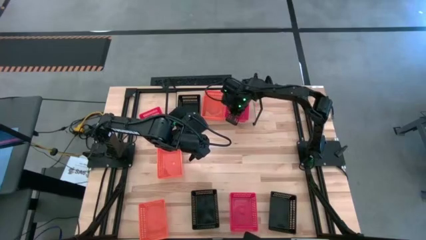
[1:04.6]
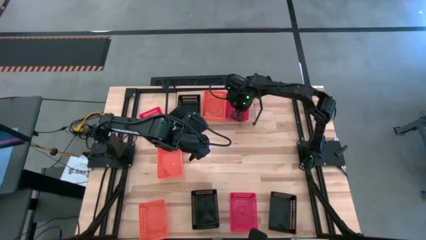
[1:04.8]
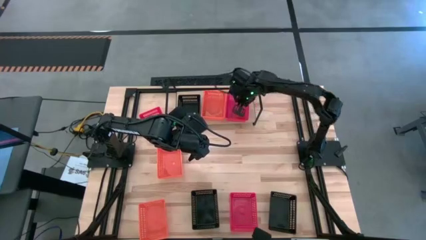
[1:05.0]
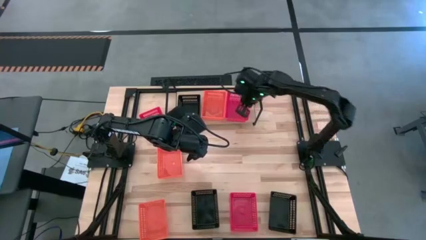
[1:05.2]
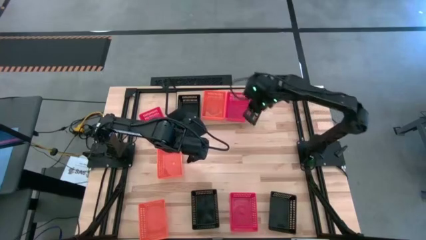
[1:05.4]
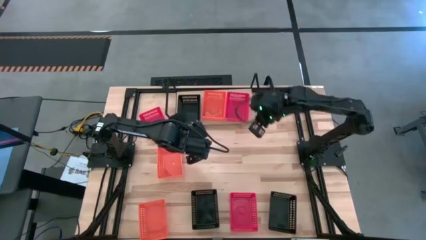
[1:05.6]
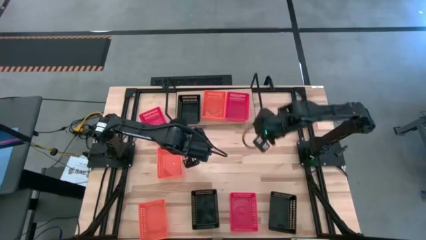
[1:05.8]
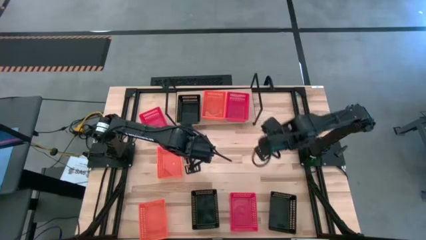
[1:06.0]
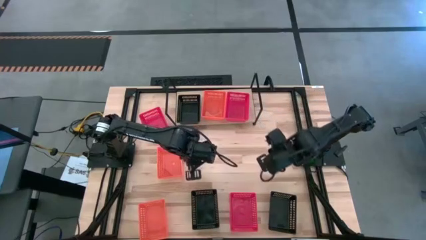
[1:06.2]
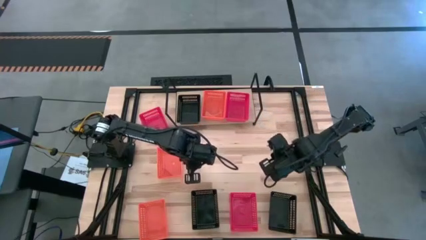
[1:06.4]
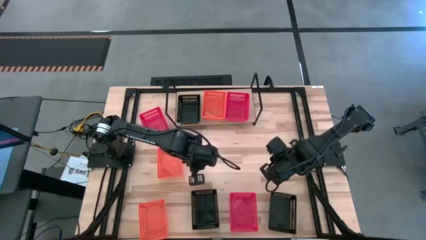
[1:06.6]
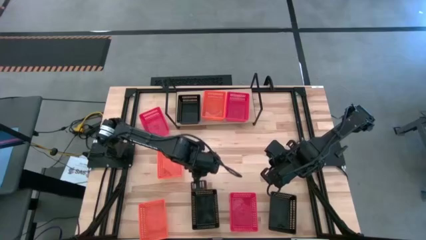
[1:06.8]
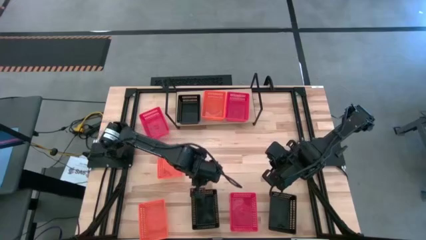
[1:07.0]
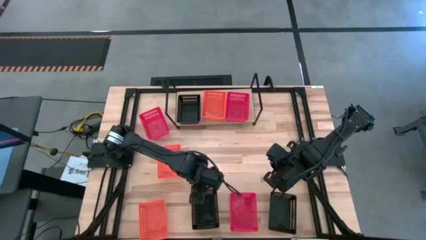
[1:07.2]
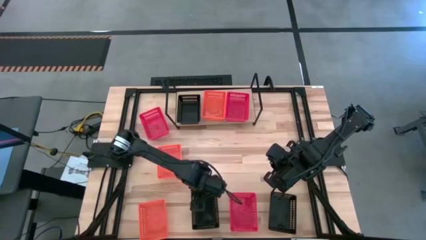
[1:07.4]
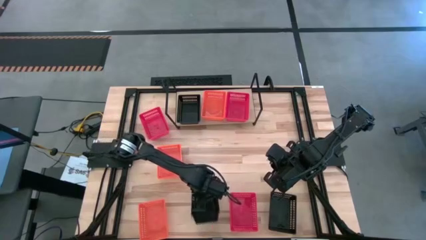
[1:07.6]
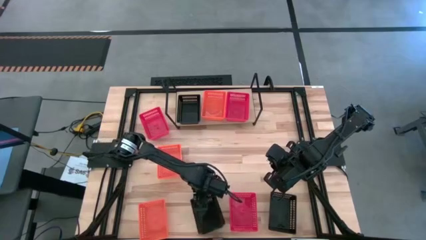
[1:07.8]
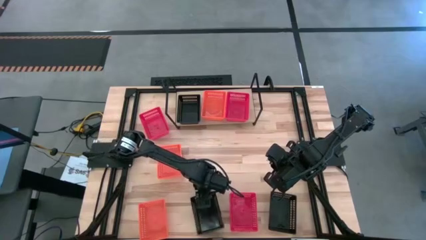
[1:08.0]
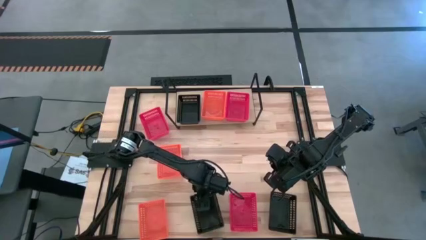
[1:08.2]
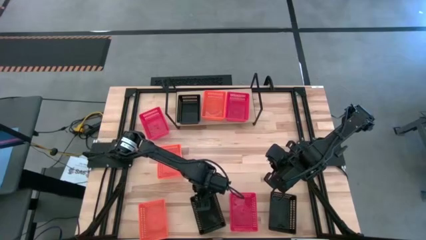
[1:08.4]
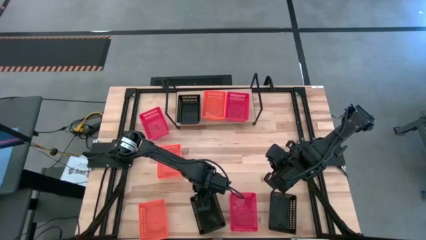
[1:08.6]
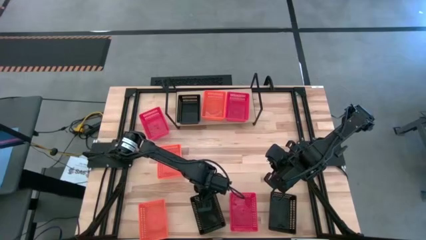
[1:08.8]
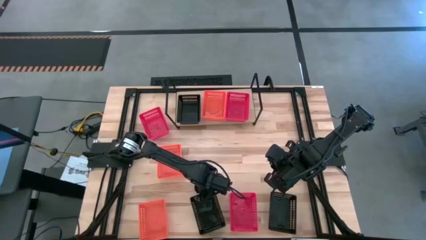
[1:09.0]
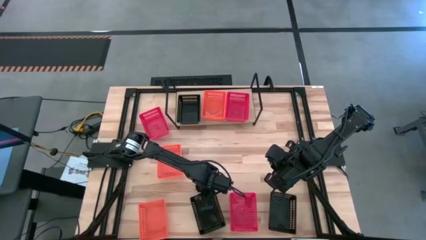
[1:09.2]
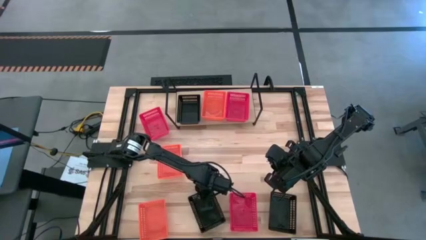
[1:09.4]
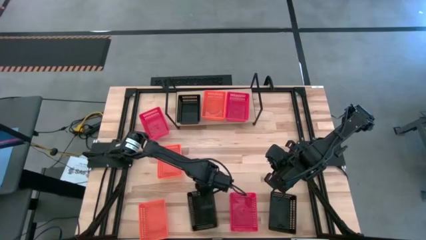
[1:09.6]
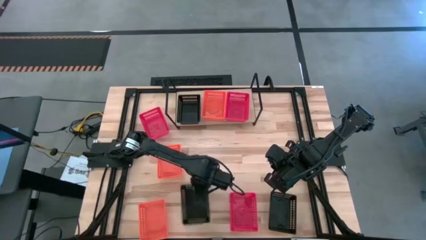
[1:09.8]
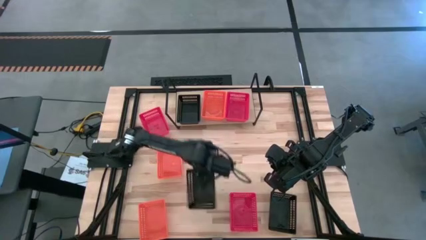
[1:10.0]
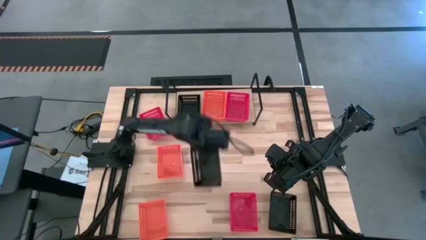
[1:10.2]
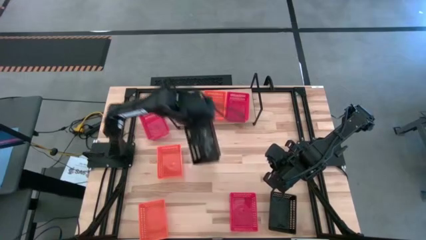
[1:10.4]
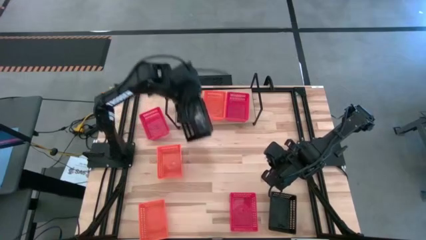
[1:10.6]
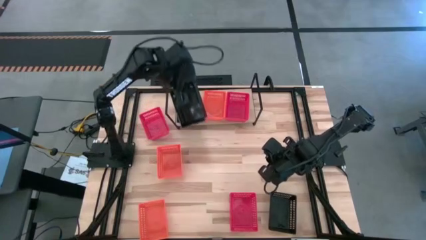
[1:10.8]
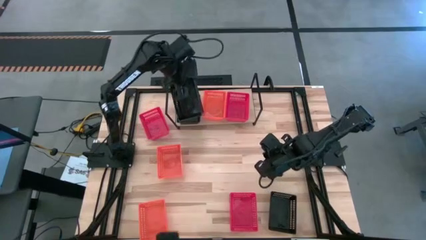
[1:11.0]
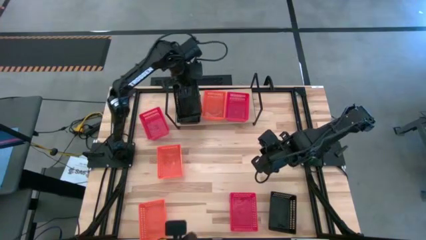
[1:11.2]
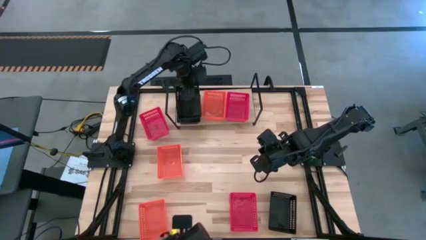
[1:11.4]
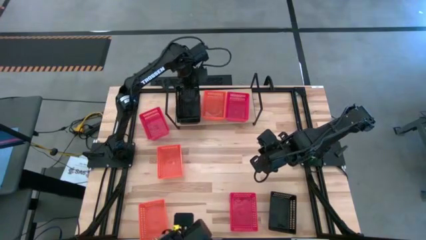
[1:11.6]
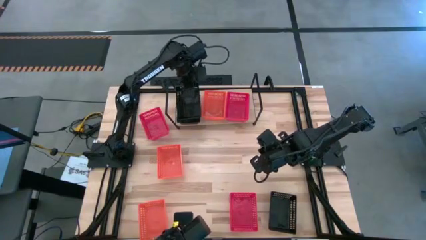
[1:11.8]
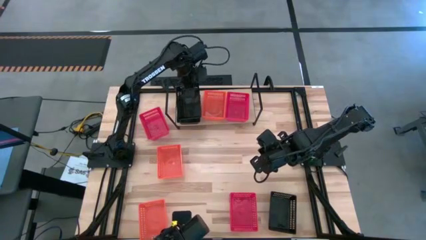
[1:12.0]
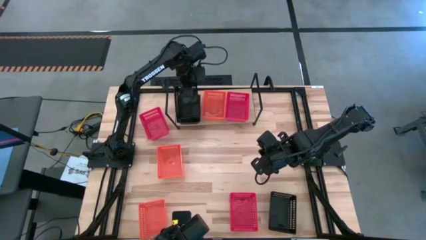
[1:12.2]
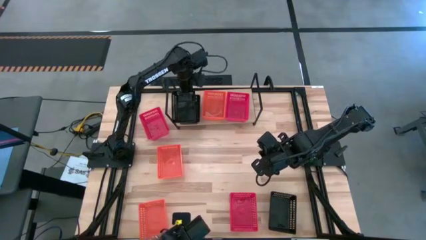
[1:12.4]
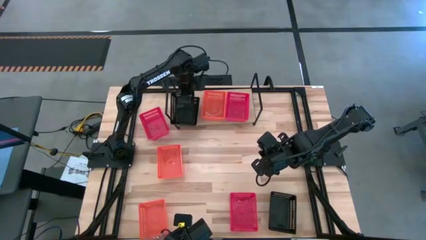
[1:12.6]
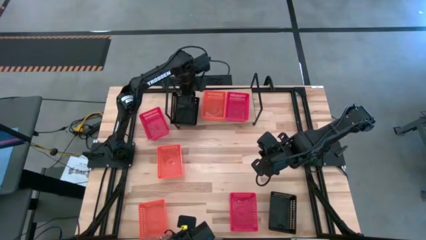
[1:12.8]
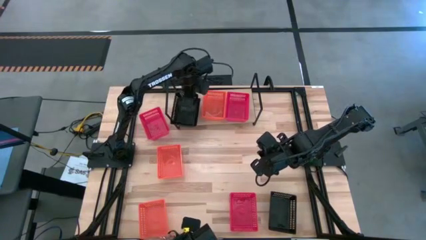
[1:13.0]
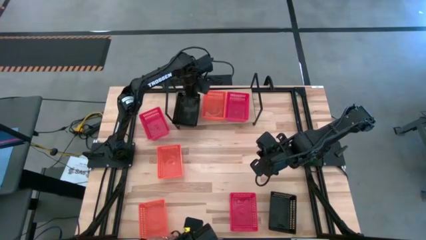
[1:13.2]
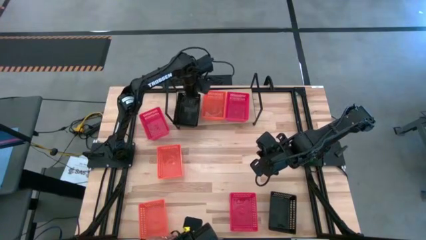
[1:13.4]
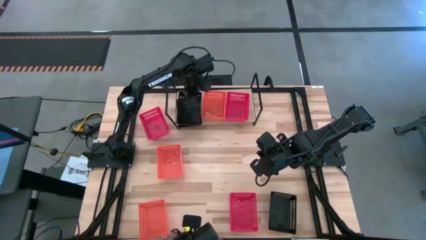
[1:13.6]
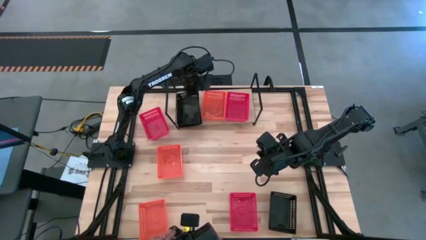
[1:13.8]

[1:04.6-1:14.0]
Task: Stack baskets on shelf by color
Stack the left black bin on top of the other black bin on the shelf
